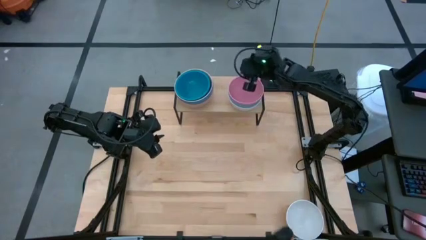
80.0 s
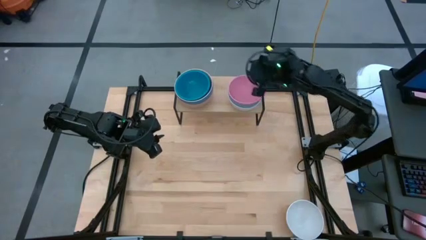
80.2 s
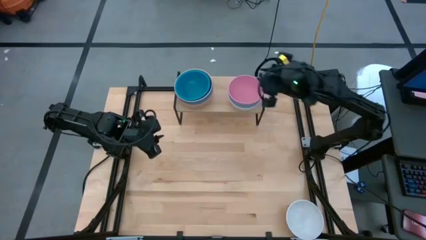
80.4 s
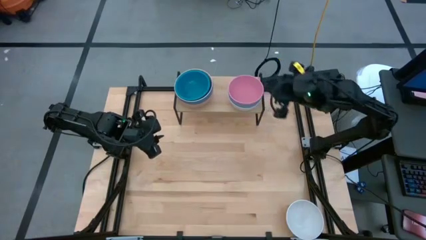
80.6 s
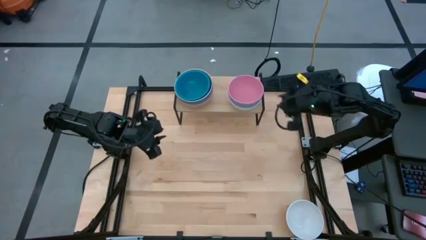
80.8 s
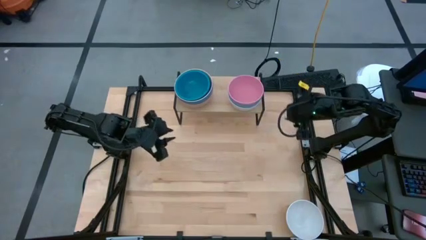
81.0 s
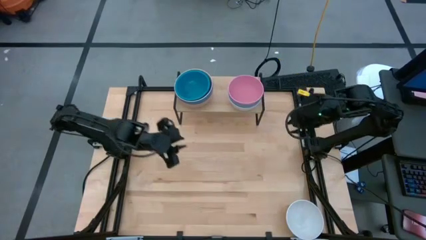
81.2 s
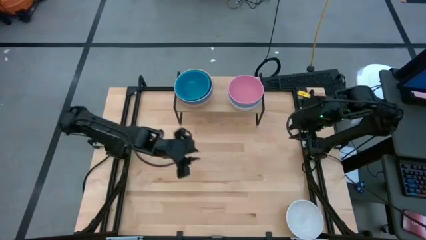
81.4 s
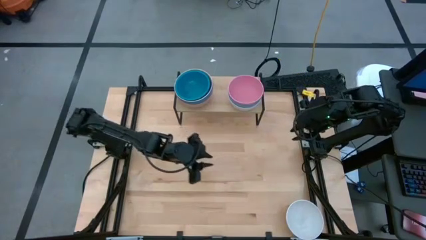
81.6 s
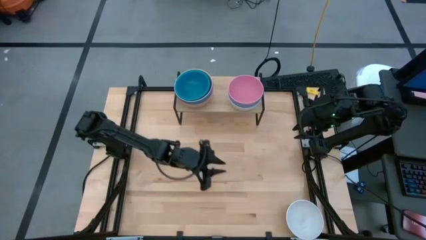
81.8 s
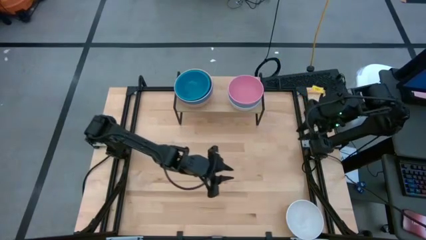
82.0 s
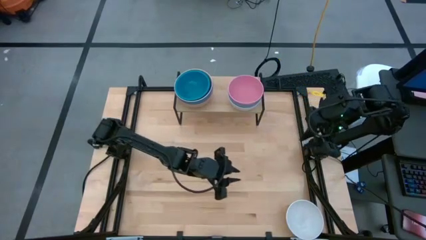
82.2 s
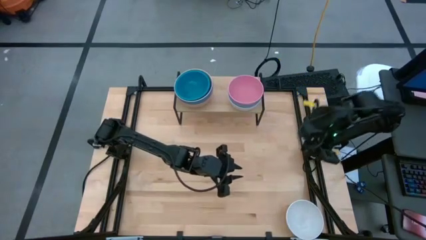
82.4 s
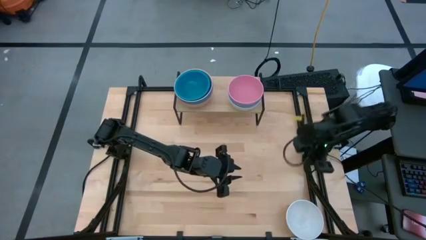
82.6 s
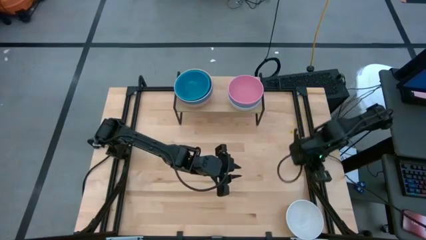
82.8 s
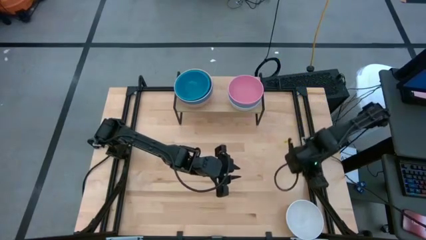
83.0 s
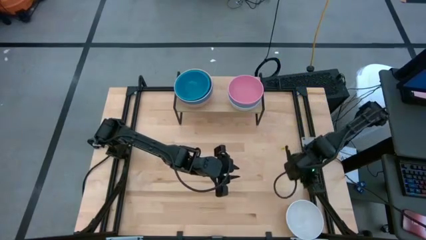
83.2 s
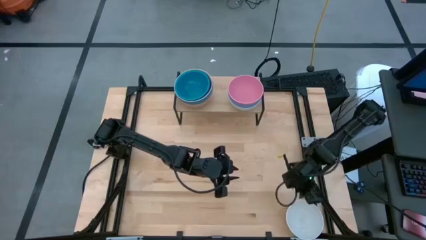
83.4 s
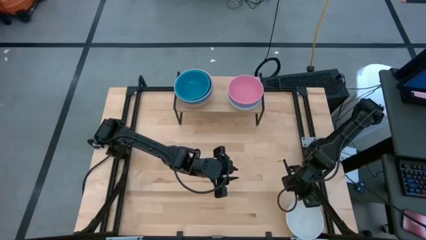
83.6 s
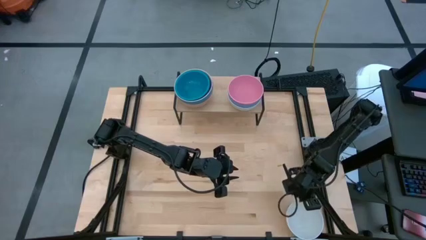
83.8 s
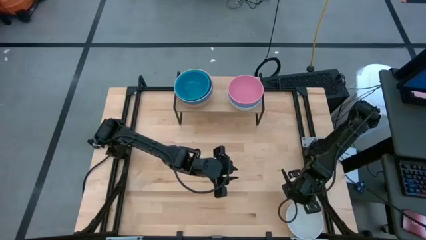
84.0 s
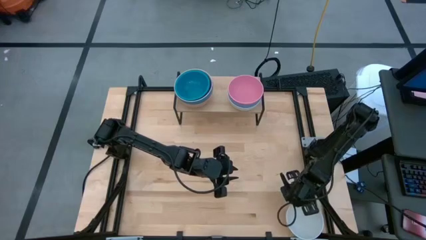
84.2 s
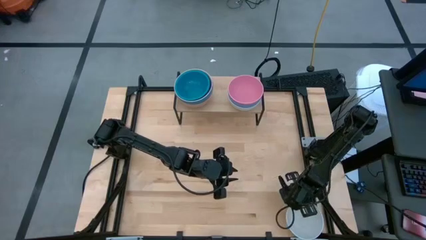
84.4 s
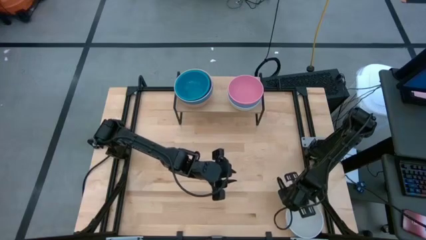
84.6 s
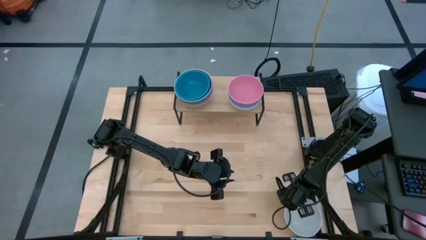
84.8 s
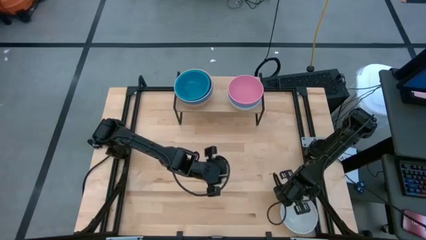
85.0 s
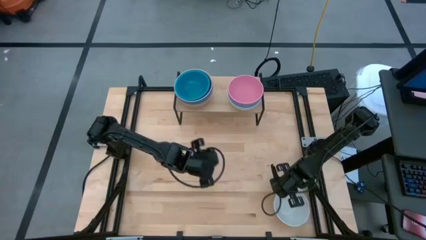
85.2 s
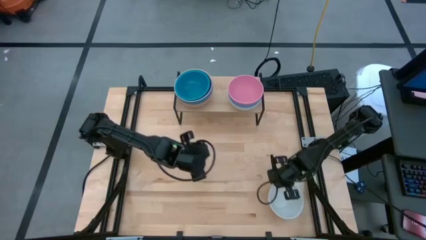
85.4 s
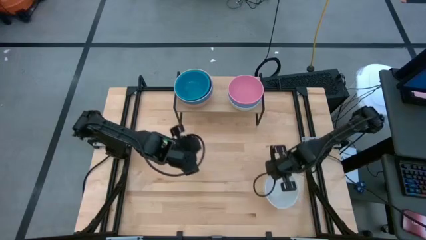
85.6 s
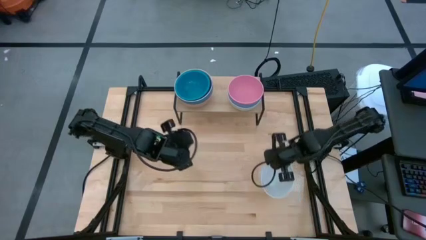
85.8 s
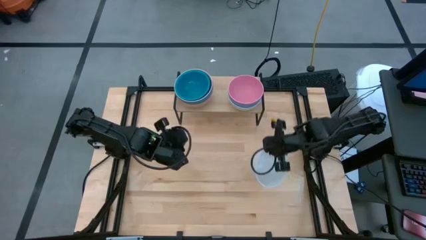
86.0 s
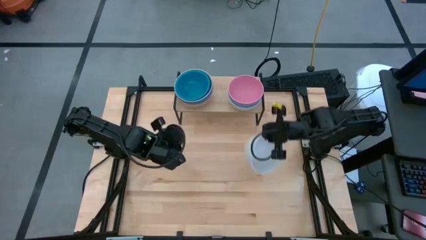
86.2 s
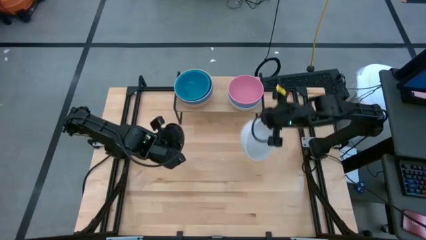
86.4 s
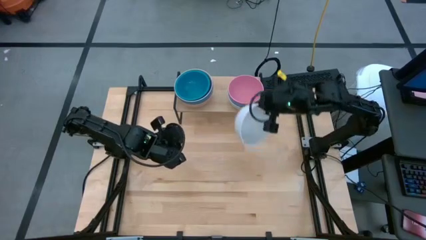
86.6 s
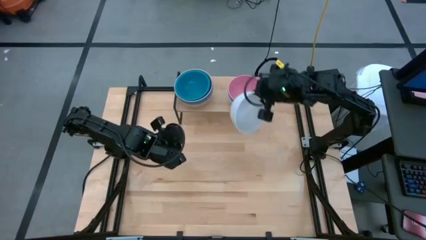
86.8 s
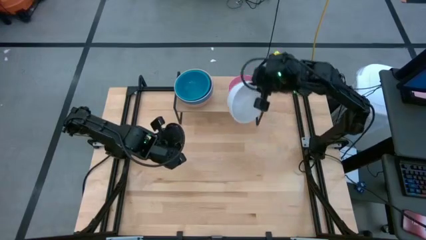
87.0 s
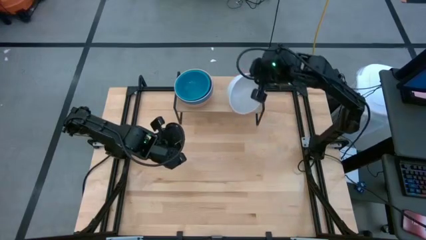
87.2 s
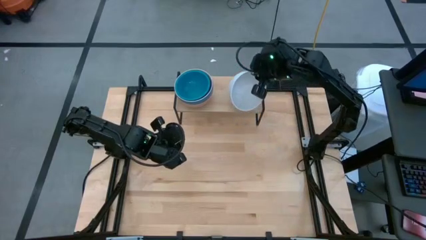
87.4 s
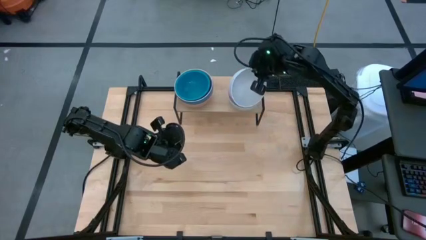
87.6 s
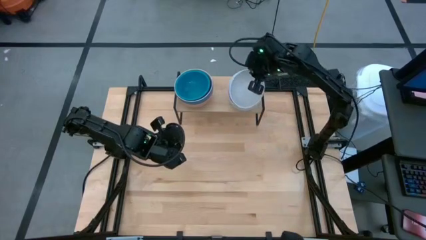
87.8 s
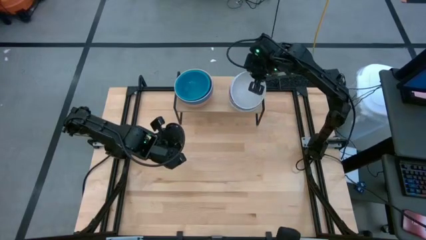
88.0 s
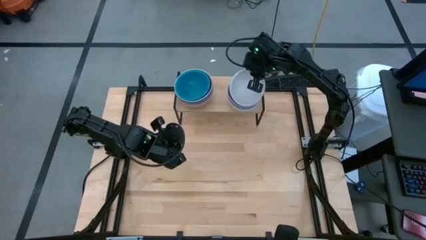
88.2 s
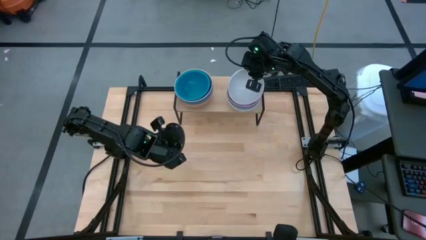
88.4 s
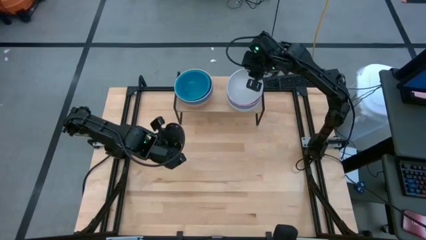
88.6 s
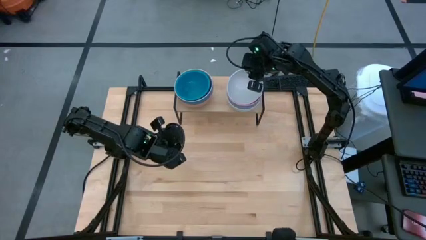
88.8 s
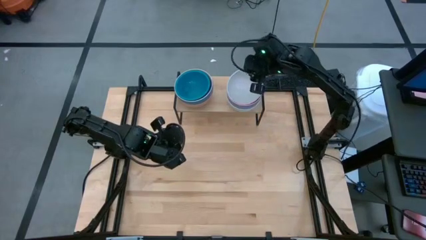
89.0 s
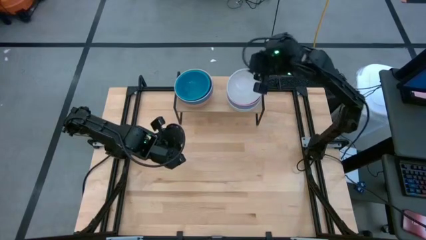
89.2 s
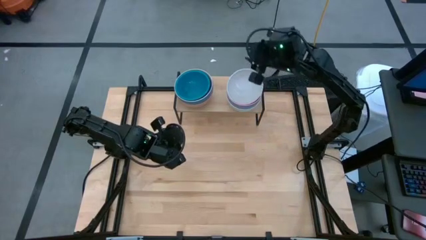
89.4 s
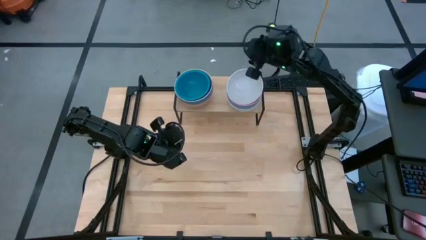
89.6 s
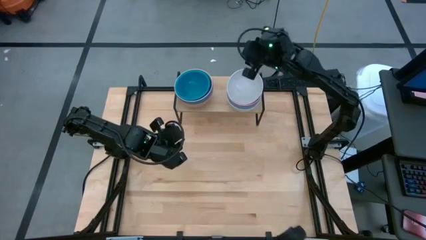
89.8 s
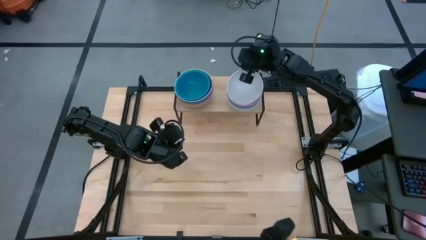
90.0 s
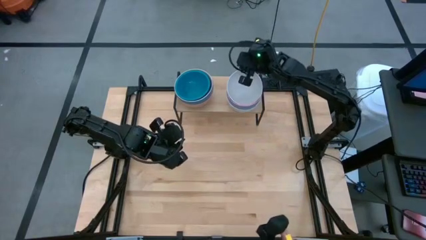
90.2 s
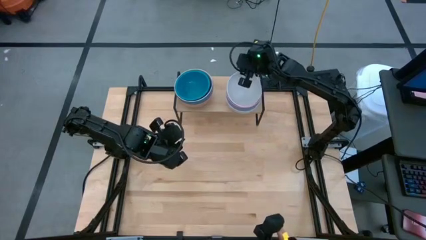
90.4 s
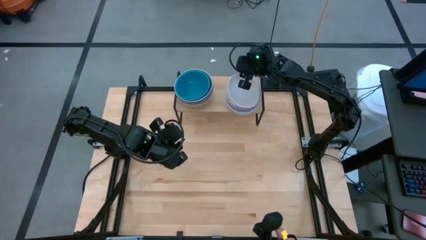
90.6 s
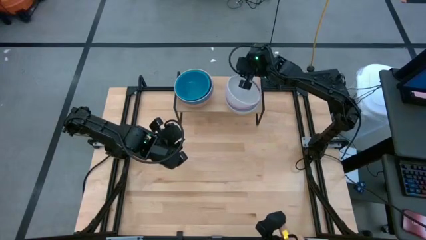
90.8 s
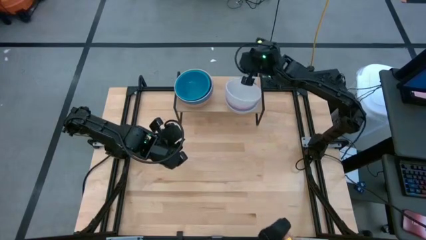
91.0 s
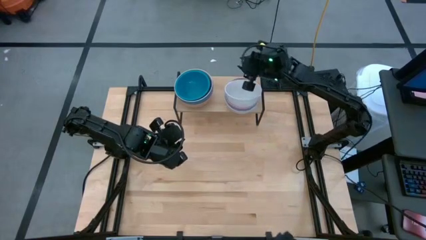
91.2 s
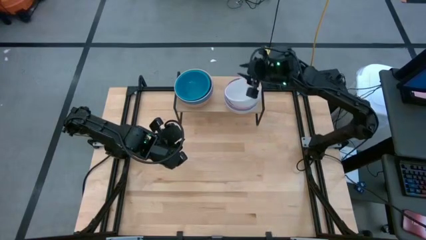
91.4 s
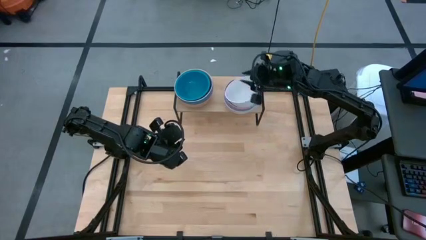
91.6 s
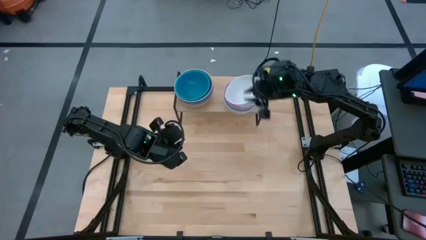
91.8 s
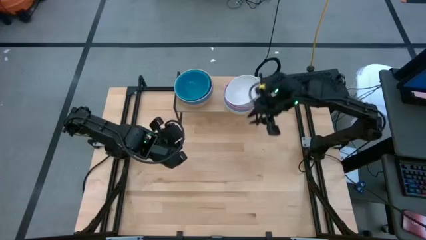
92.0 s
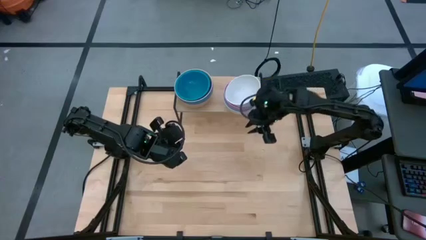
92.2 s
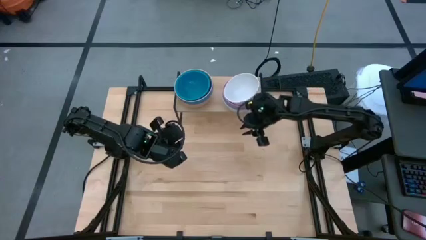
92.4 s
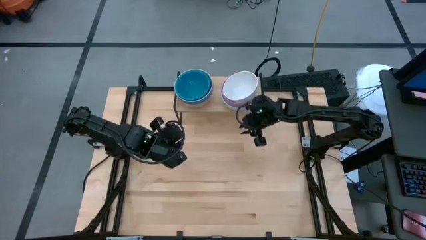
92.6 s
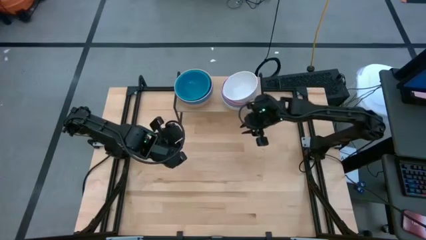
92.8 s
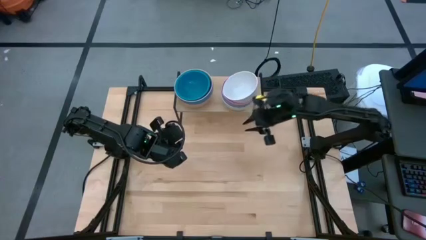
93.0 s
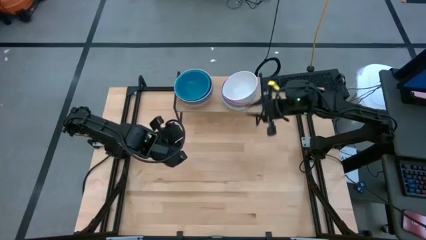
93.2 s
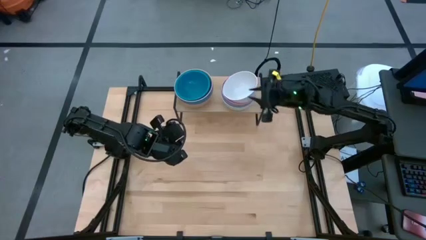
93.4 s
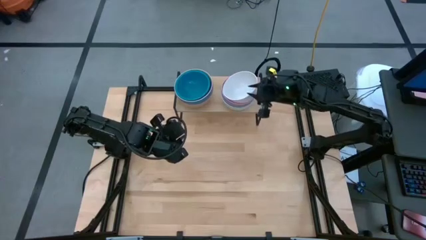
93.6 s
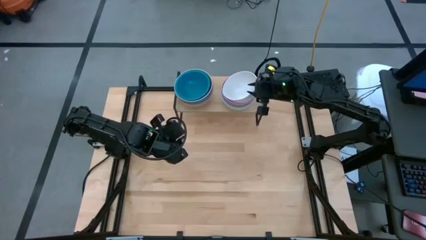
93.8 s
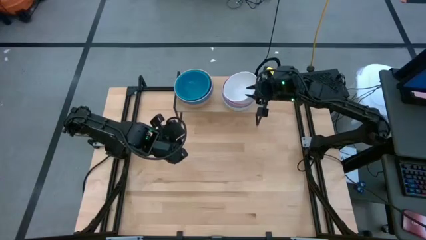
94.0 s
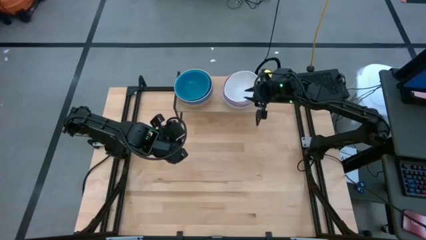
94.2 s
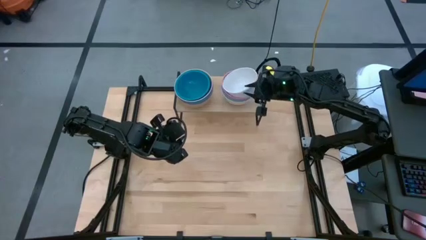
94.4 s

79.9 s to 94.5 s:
Task: Place and stack bowls onto a shelf
Stack the white bowl on top of the pink bowl on the shelf

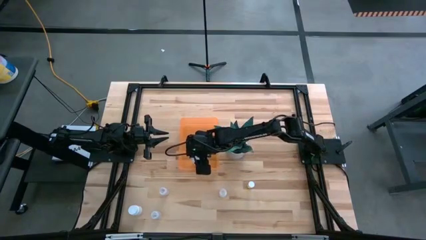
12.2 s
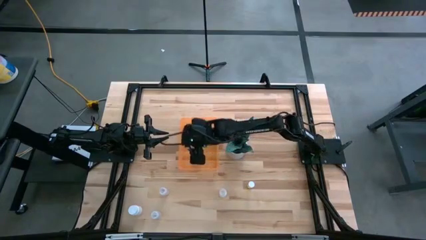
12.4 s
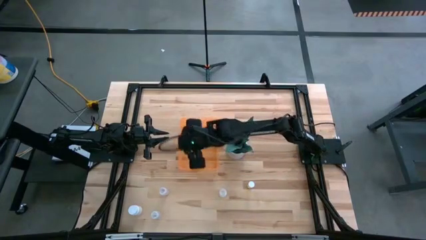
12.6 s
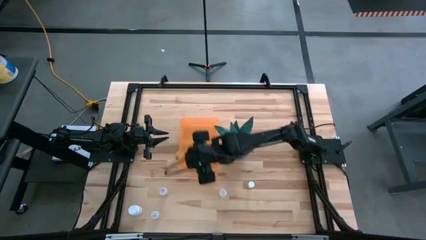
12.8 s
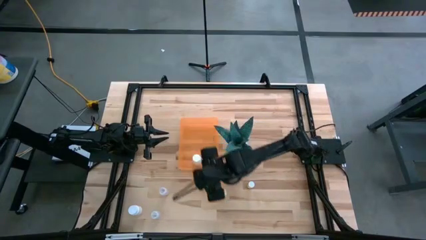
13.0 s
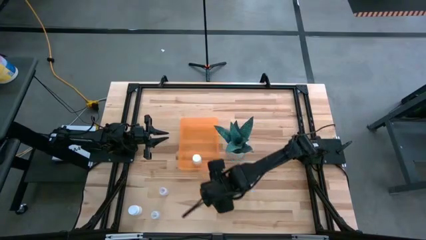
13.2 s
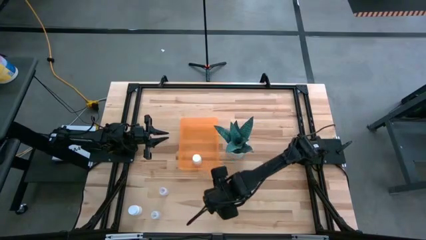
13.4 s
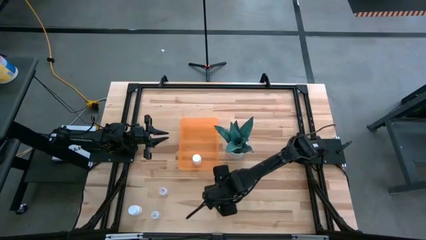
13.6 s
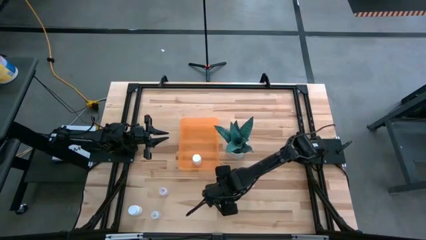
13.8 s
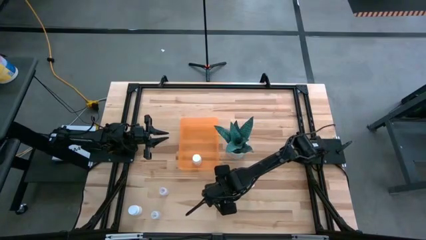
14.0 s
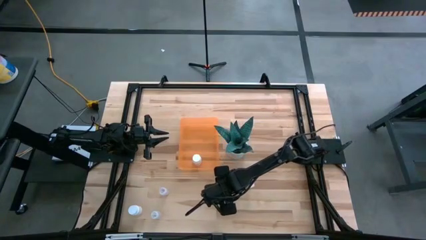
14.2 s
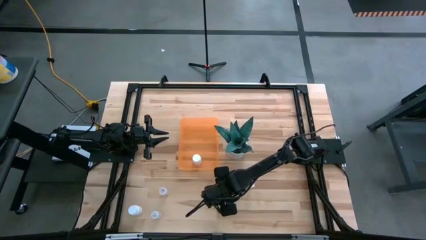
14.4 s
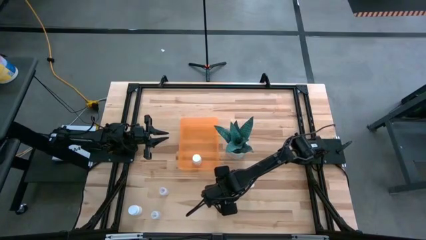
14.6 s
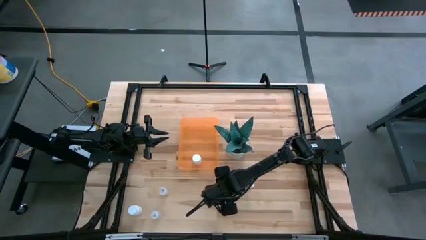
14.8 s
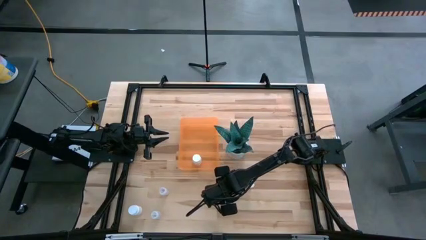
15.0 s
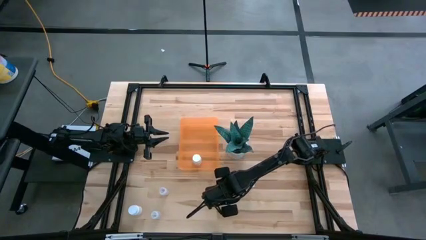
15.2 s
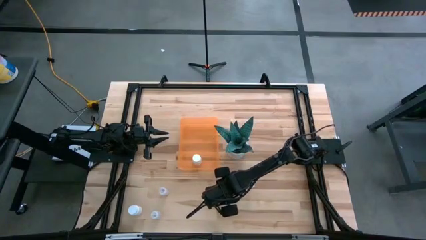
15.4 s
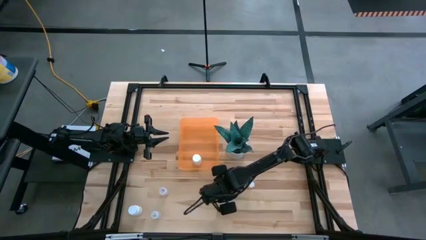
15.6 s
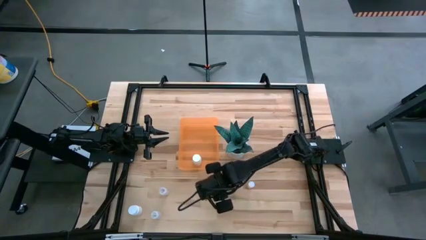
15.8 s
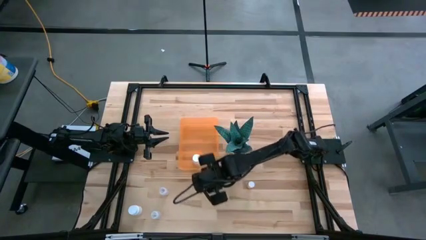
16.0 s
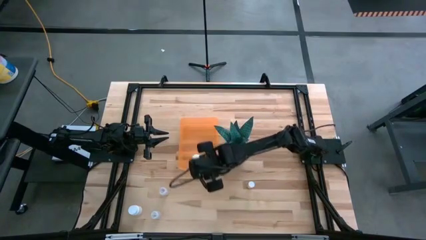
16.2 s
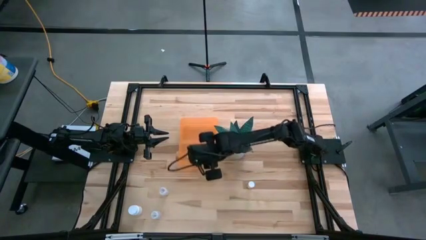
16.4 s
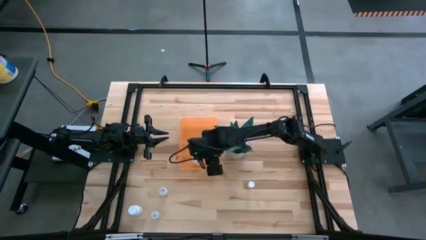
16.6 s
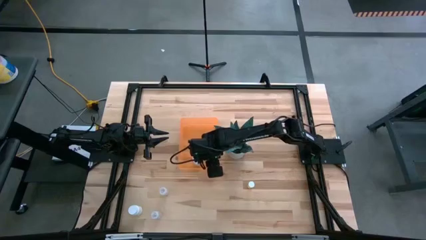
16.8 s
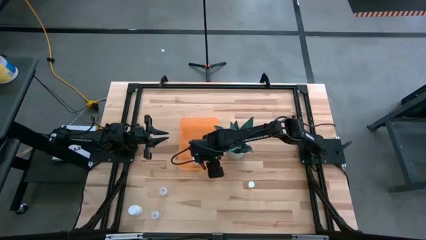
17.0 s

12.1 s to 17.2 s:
Task: Pick and place pill bottles into a basket
Put the right transparent pill bottle into the orange container
